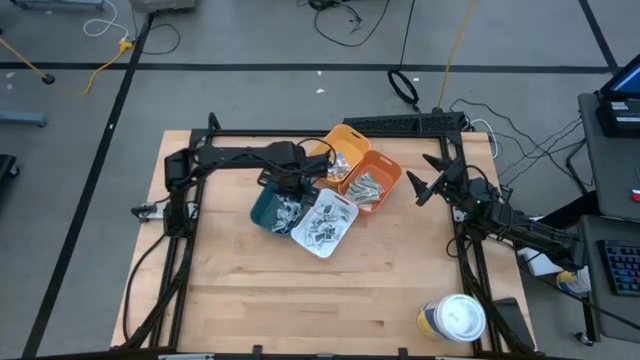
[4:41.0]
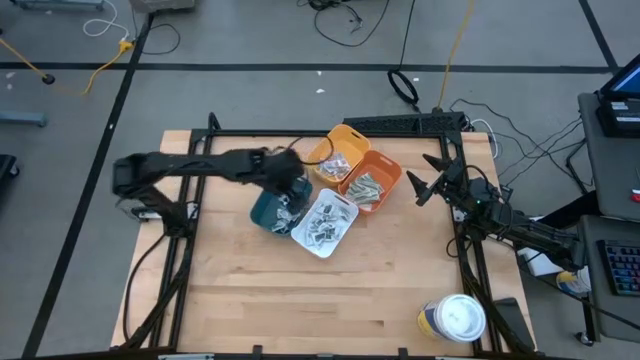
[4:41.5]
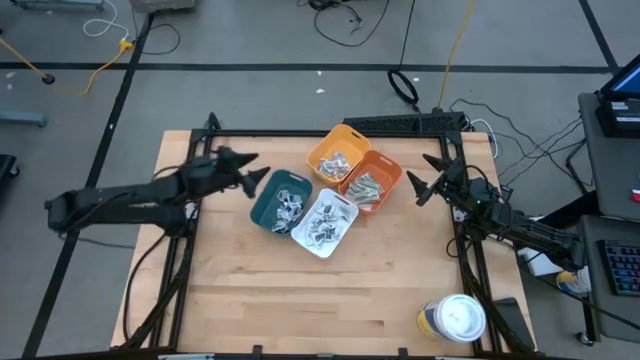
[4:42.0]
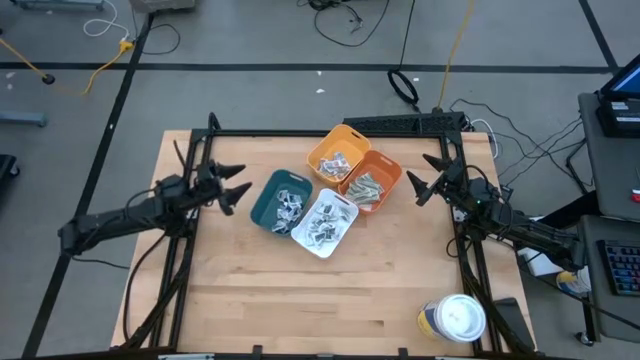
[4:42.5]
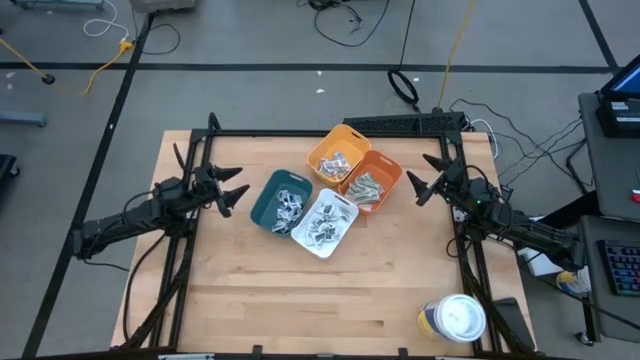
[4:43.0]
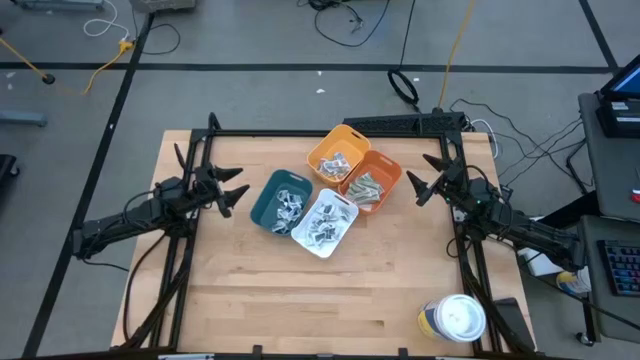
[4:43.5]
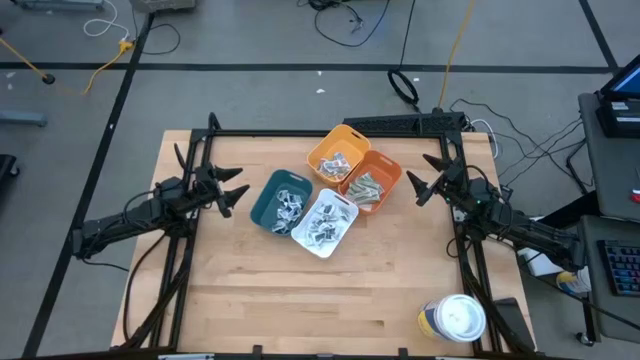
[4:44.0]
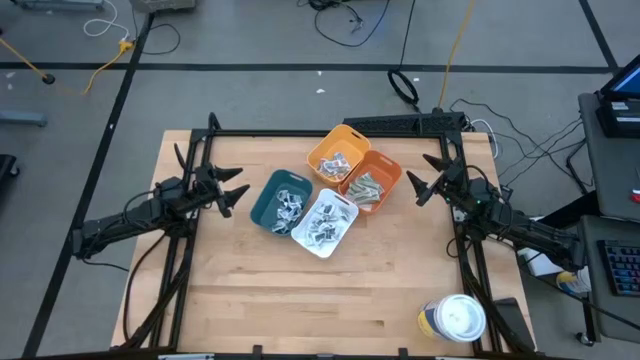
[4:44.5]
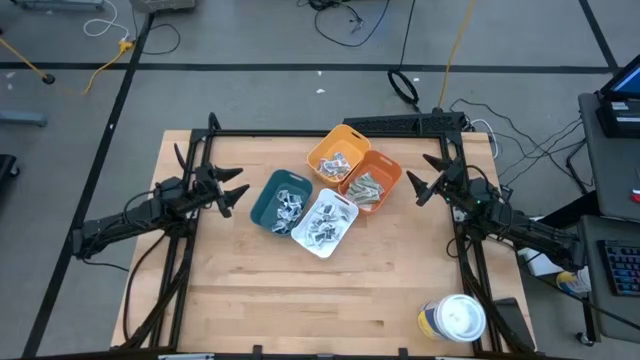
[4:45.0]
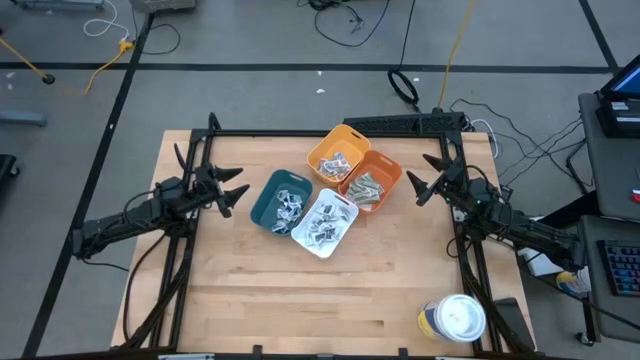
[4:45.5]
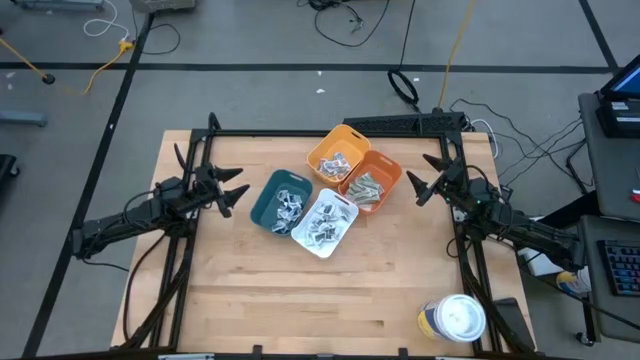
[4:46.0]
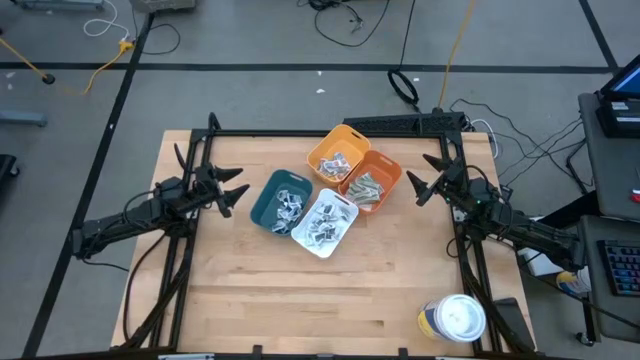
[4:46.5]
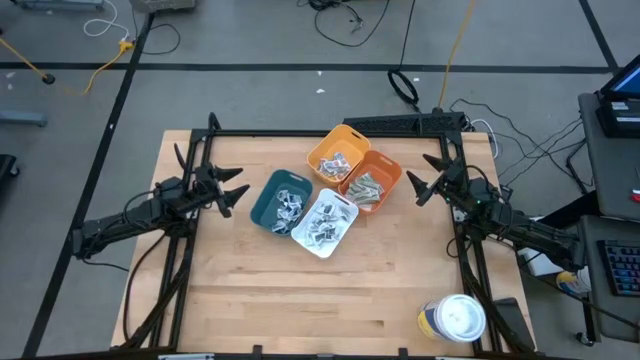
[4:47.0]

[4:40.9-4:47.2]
Task: Pick & Place First Aid Supplies
Return to Home Position

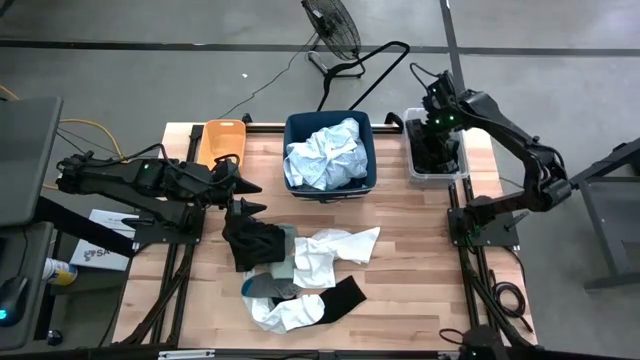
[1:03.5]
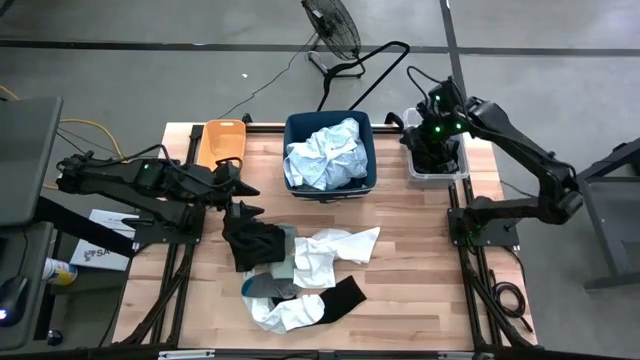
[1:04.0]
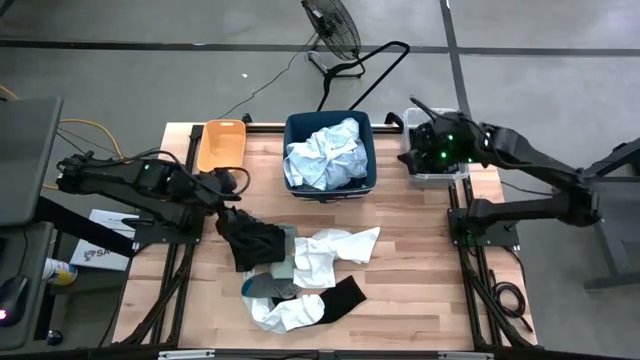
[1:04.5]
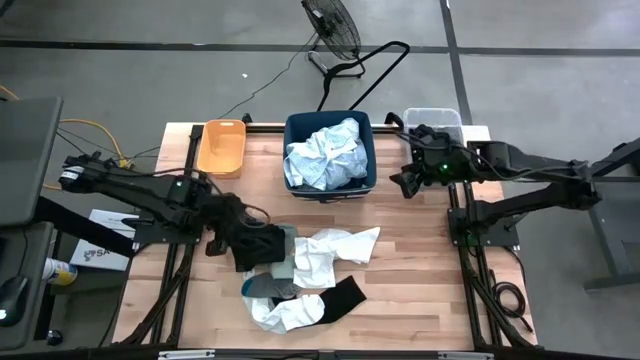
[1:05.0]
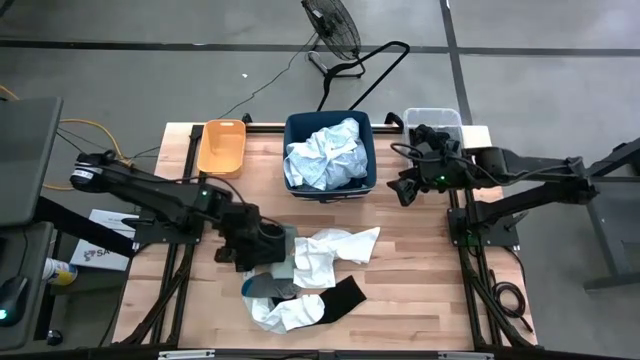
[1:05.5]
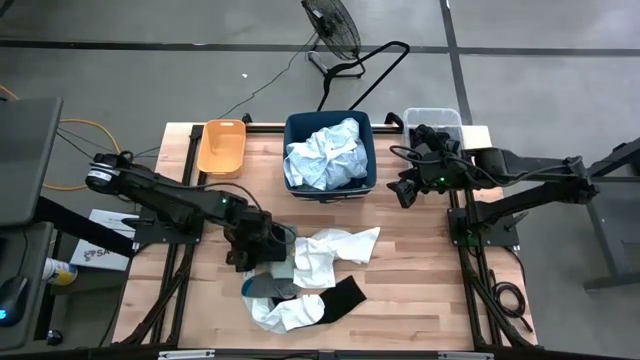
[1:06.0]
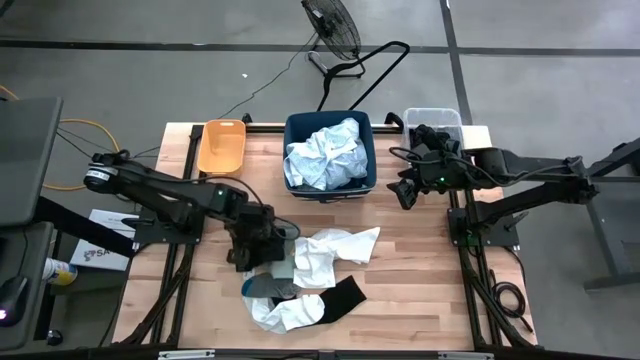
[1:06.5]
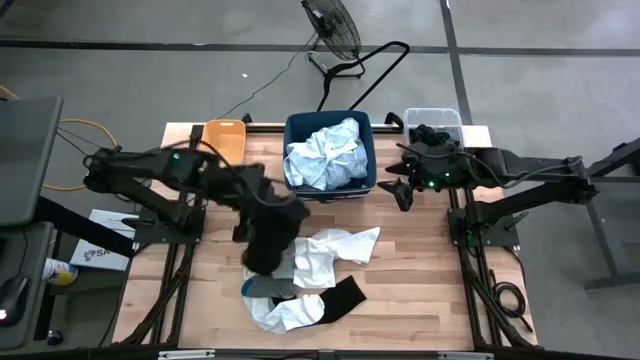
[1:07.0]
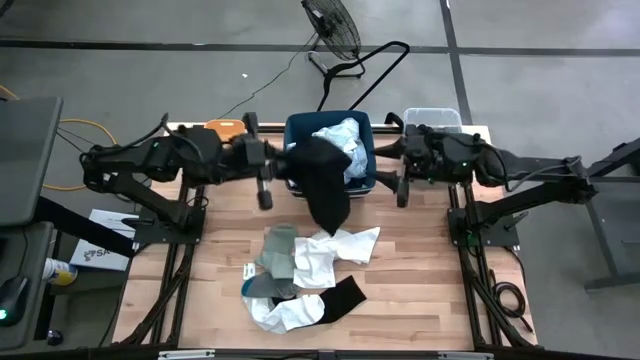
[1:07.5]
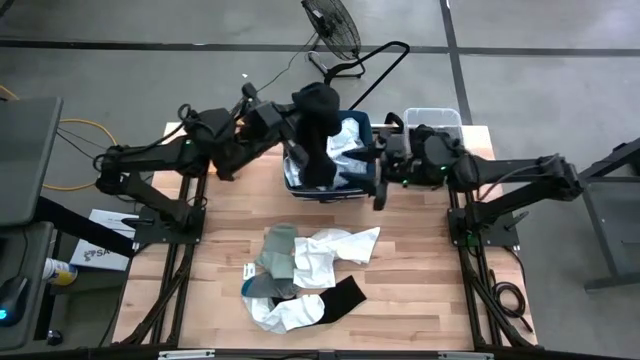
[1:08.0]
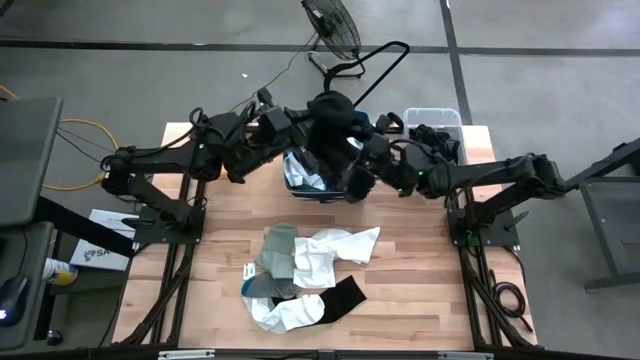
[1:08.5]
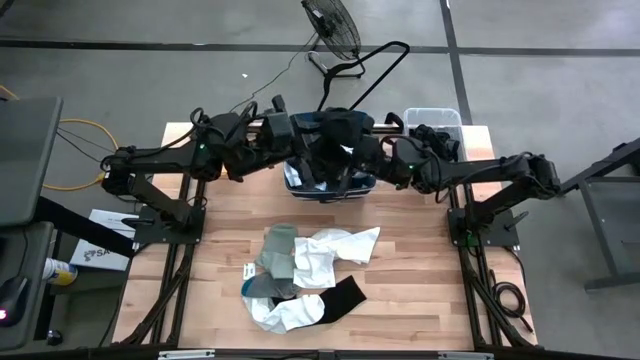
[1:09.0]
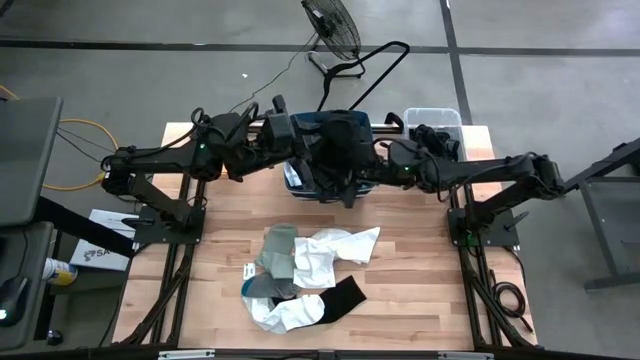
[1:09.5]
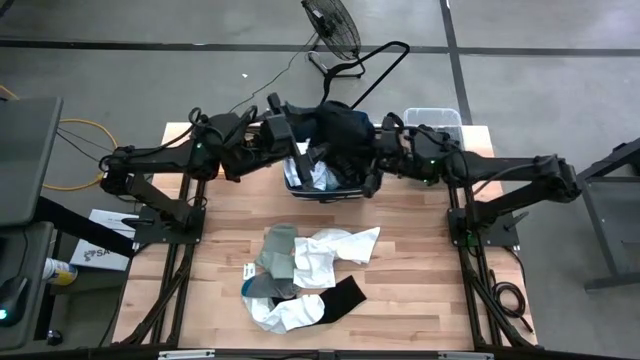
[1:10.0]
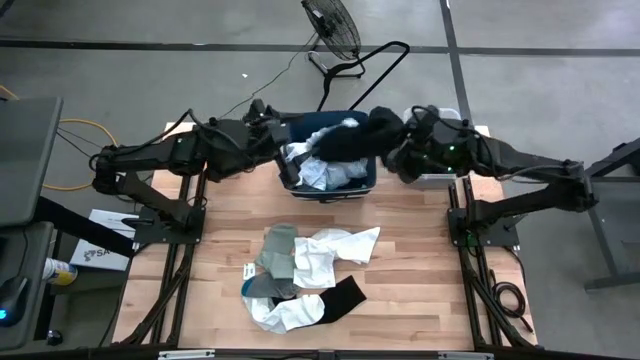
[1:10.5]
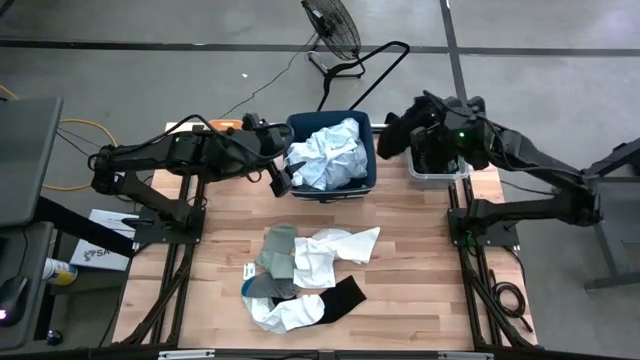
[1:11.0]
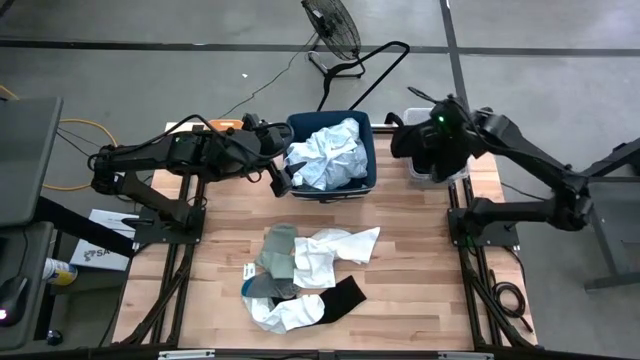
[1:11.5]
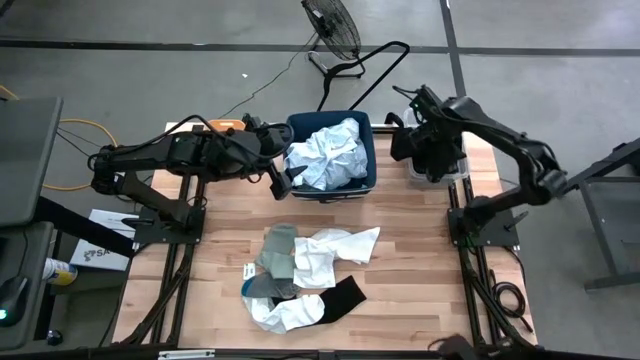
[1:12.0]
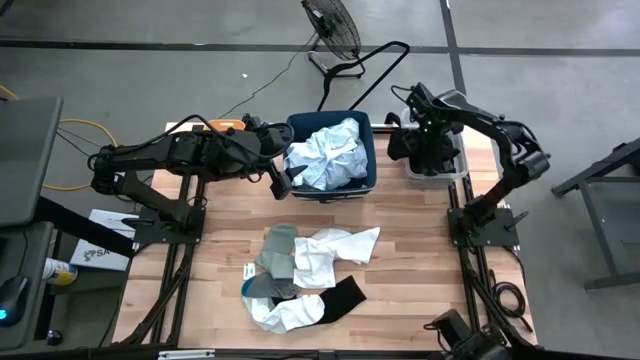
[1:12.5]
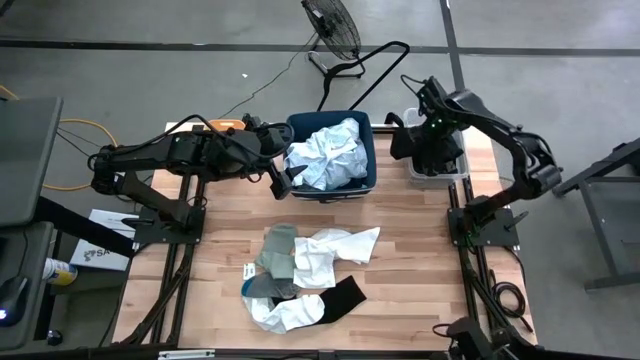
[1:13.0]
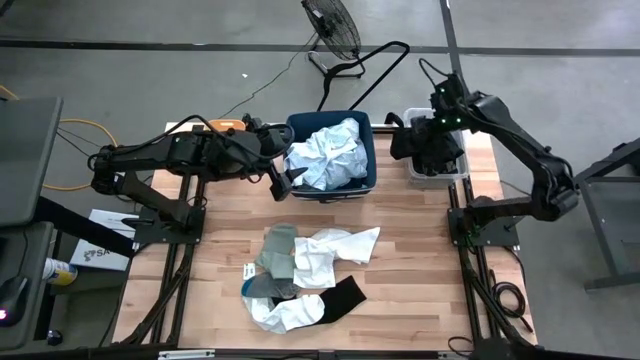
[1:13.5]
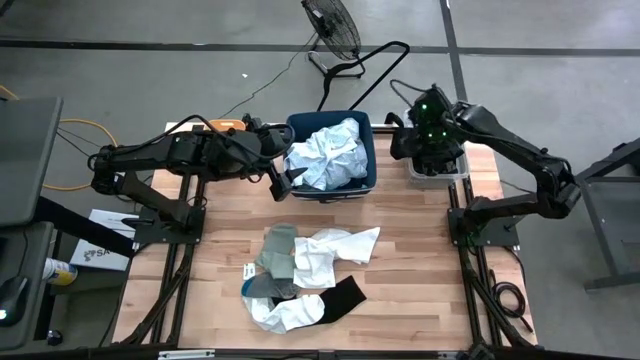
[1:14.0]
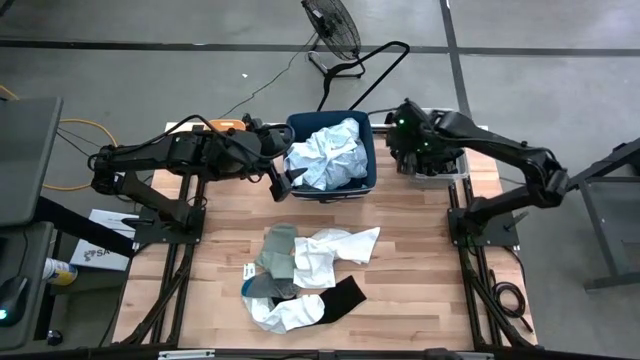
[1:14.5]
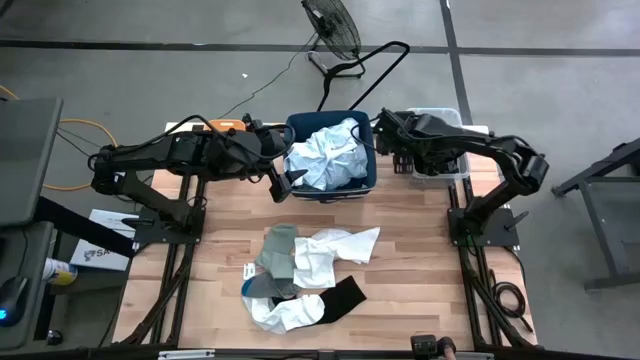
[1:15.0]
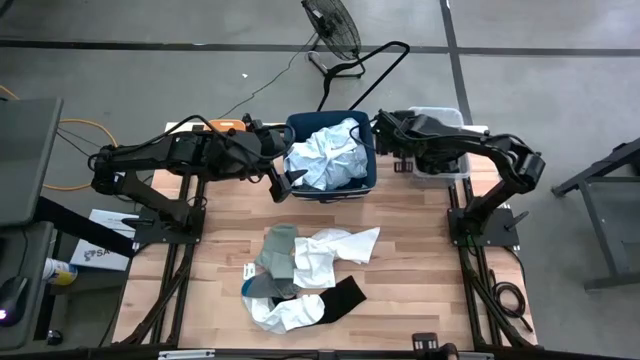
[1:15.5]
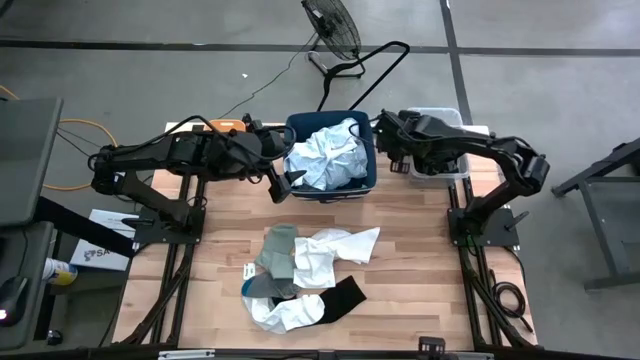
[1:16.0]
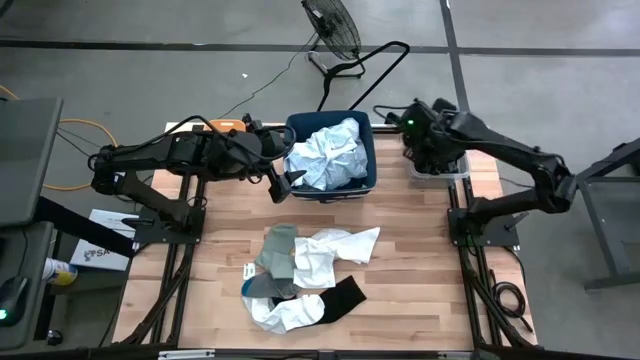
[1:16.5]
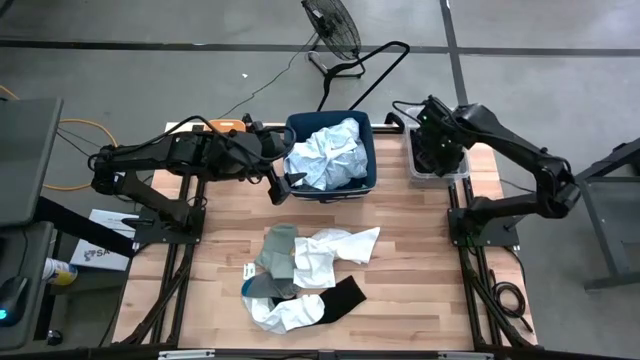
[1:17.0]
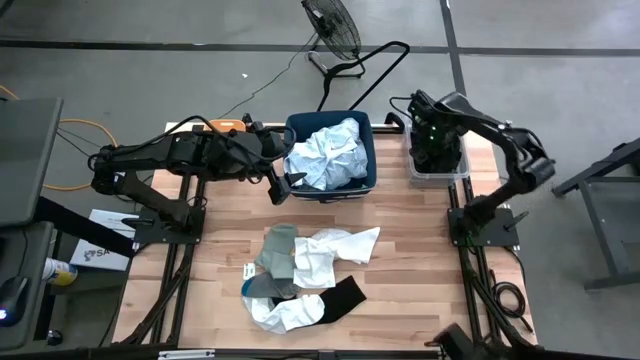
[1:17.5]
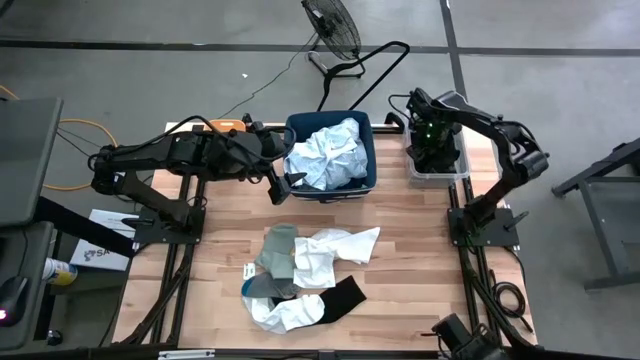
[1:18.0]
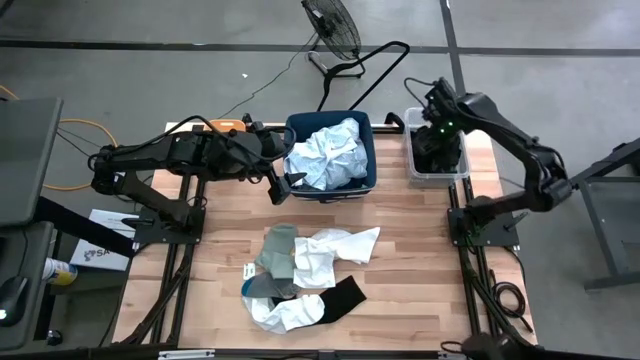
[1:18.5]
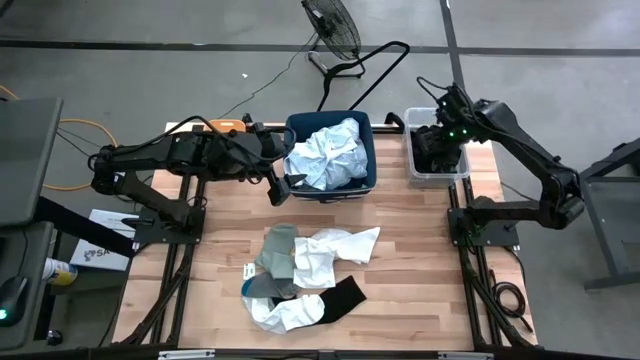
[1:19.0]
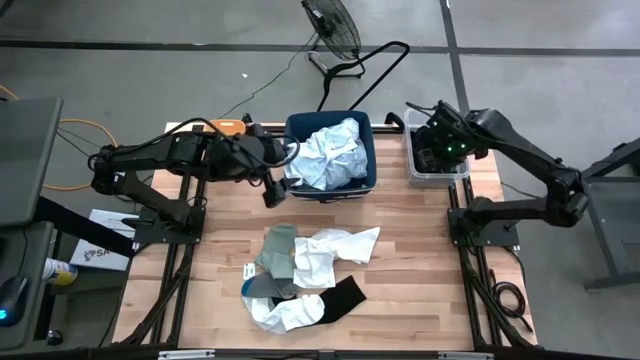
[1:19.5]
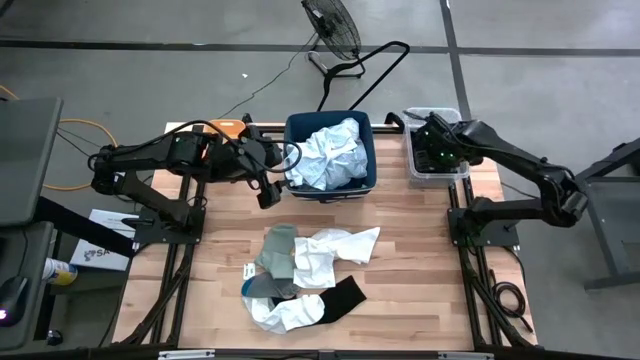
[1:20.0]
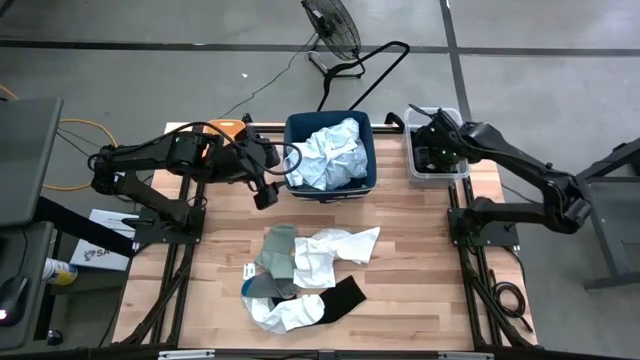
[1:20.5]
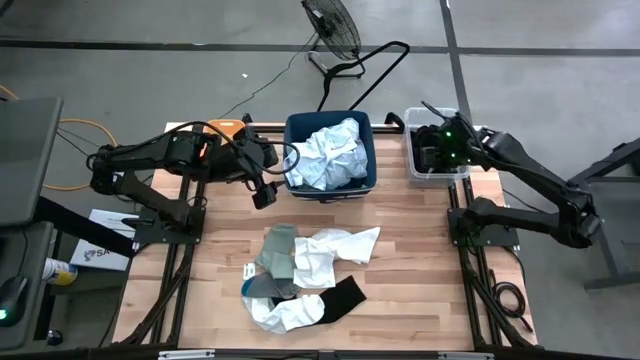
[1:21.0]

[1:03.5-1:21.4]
Task: Pick & Place Cloths
Put the black boxers into the transparent bin
